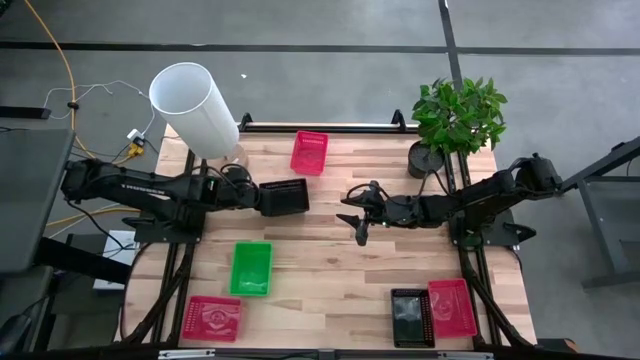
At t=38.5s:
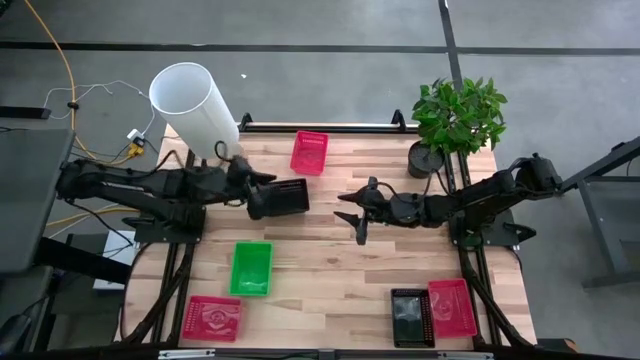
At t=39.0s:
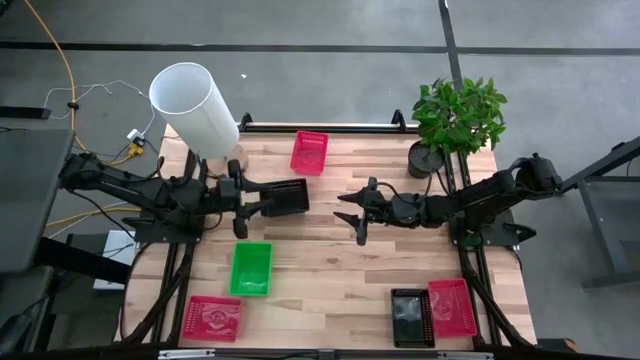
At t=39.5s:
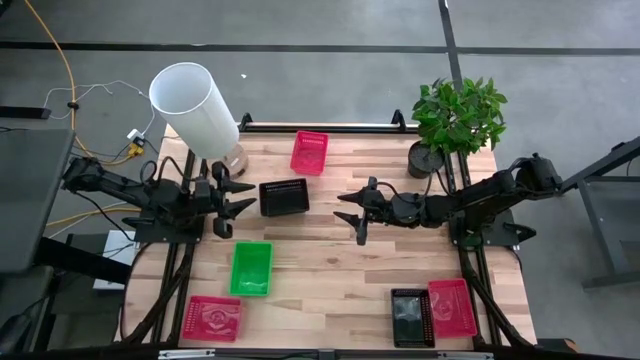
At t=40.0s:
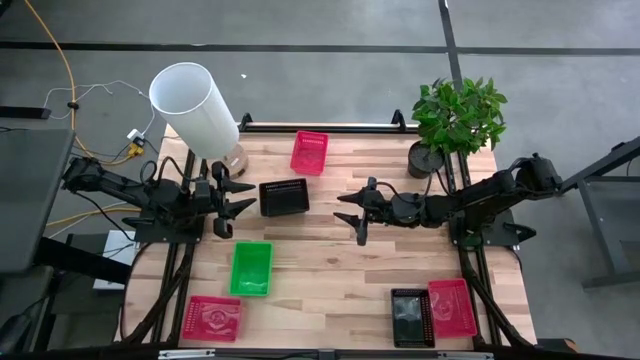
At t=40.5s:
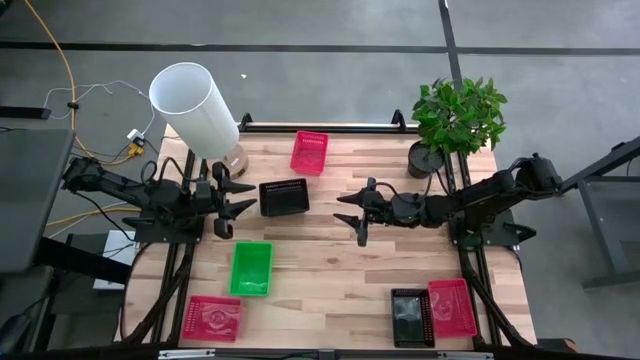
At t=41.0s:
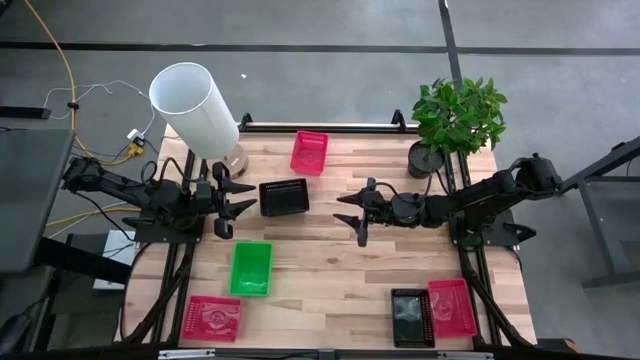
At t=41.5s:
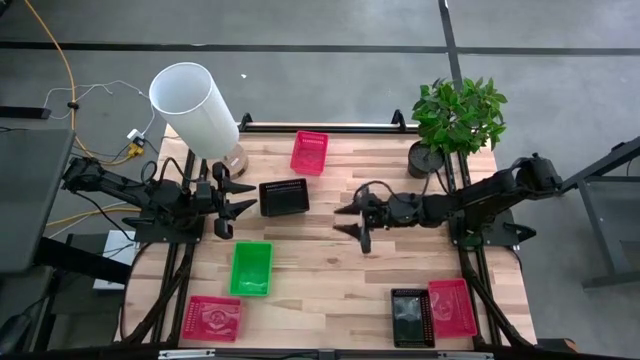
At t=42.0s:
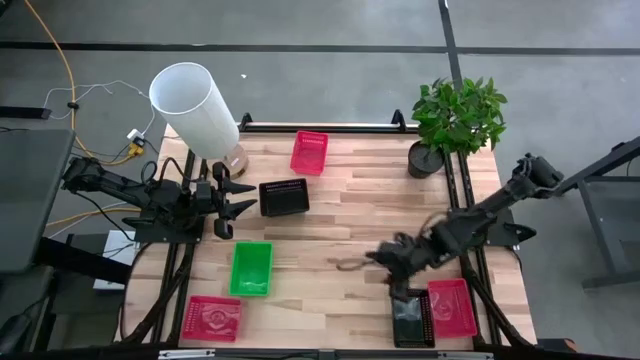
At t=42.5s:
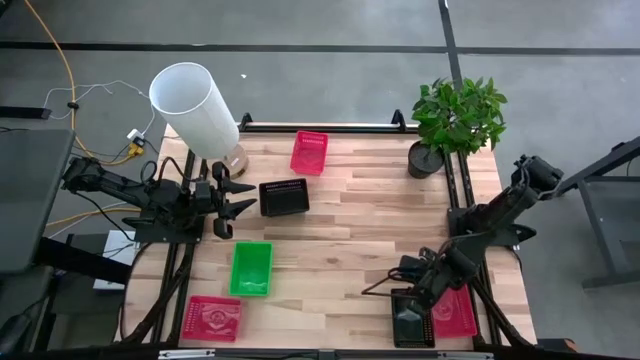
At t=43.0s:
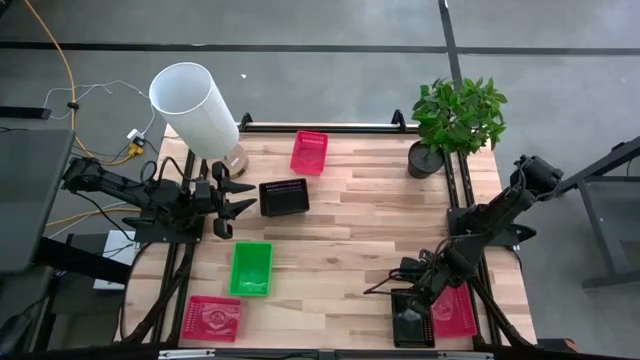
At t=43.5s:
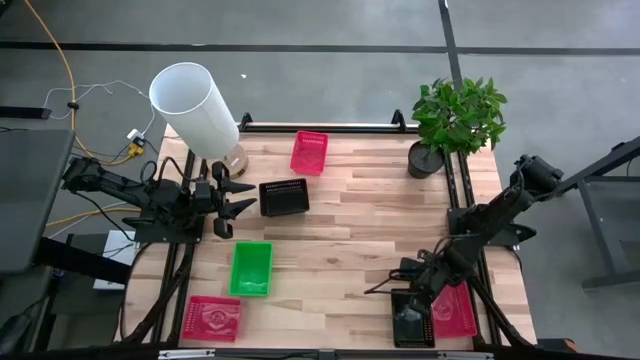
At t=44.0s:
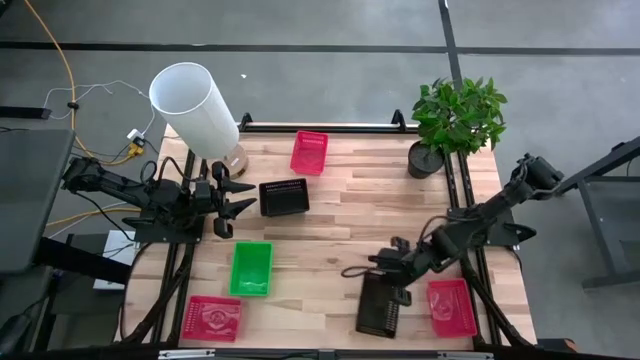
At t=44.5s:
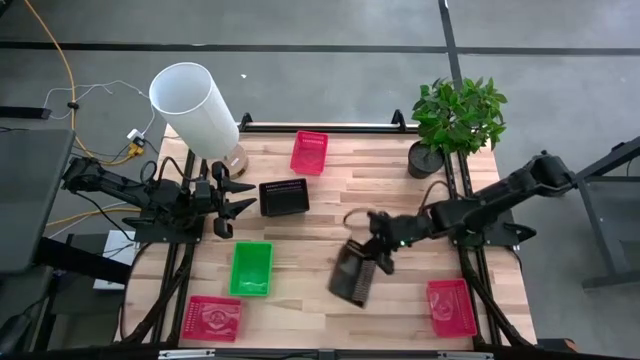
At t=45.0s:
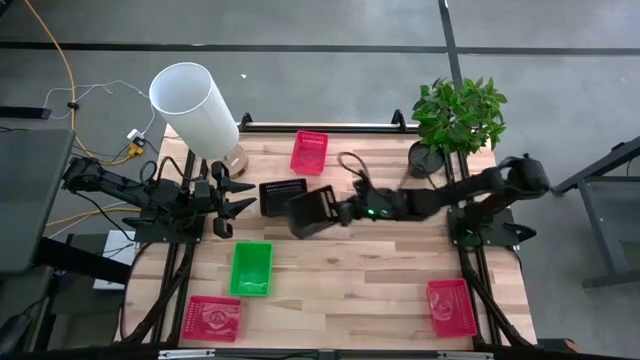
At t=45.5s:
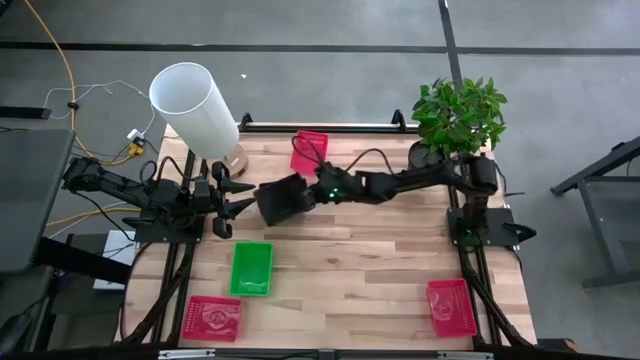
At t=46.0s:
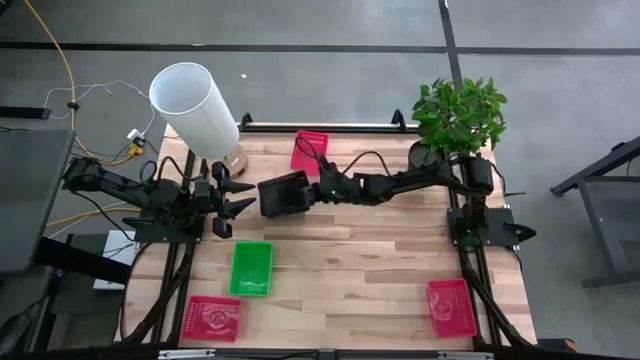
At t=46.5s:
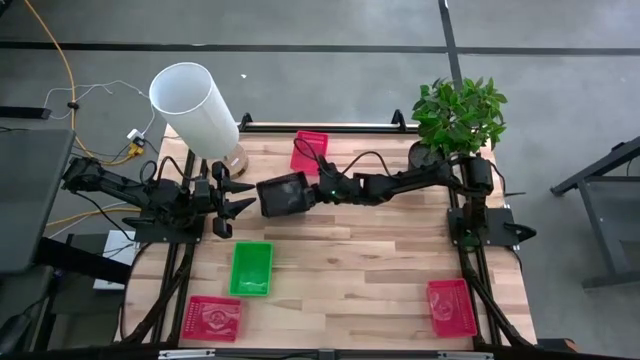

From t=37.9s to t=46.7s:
Stack the bottom black bin on top of the top black bin

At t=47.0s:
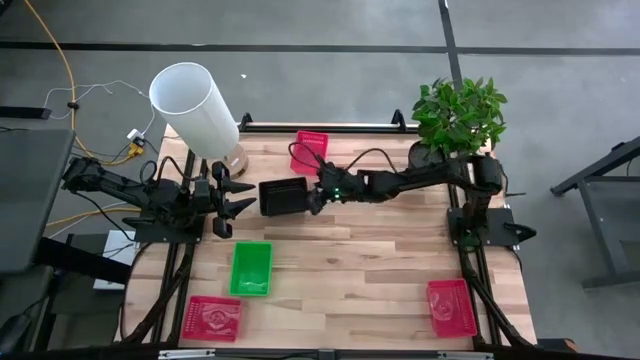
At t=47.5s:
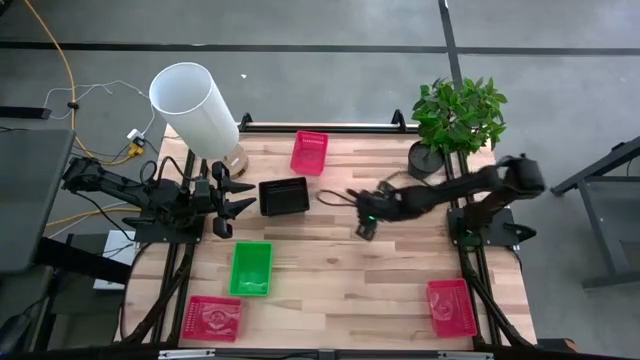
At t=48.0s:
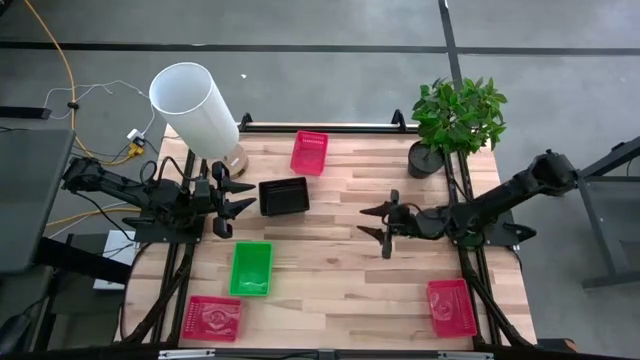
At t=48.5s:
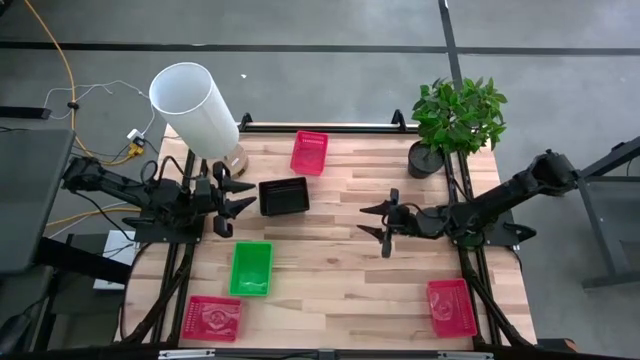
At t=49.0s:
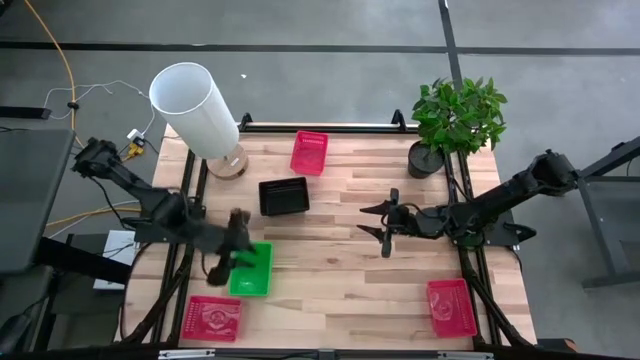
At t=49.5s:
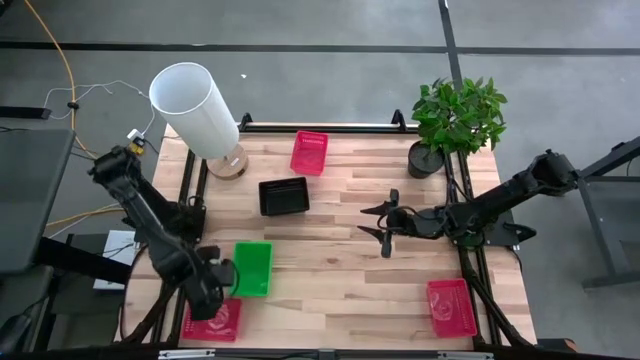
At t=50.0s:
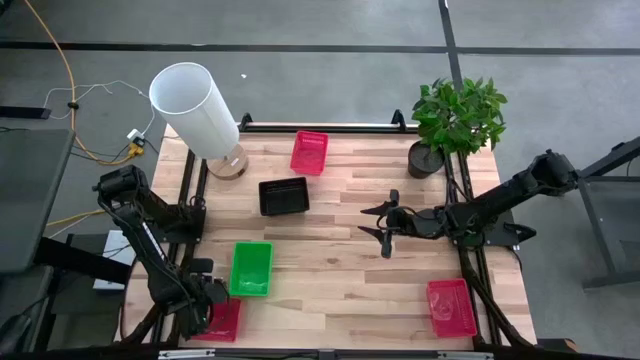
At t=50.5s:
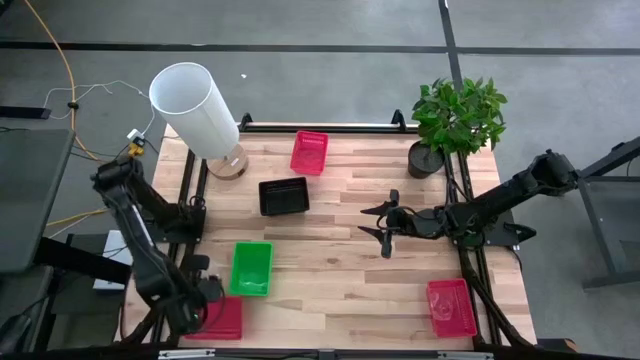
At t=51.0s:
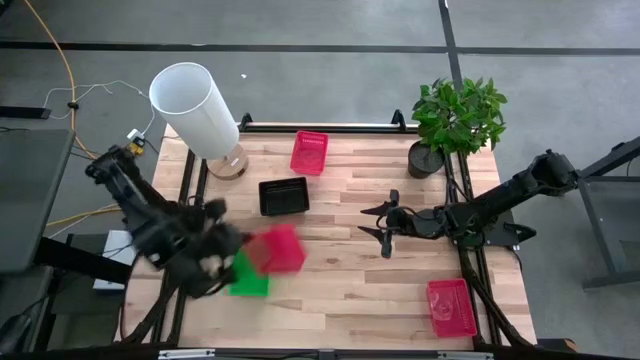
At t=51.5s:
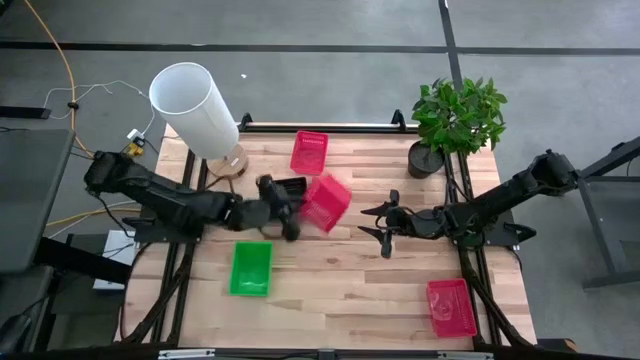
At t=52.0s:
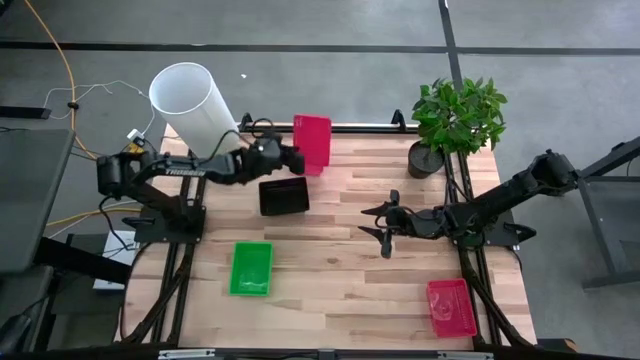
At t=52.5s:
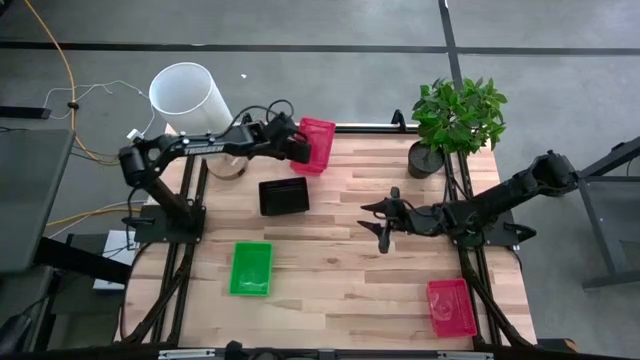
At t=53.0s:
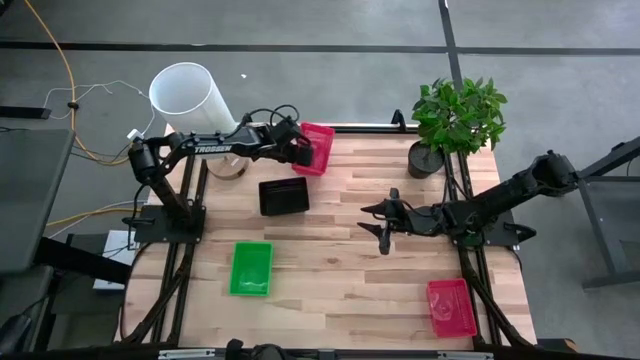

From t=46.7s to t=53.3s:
Stack the bottom left red bin on top of the top red bin

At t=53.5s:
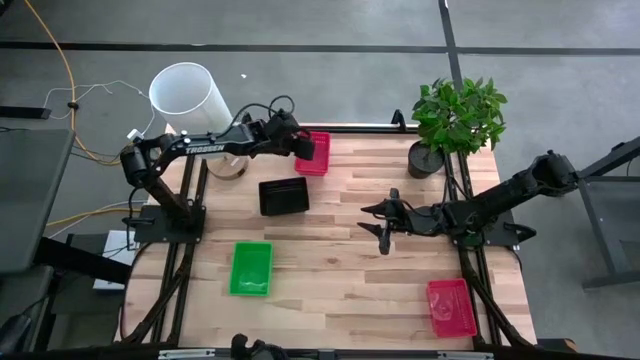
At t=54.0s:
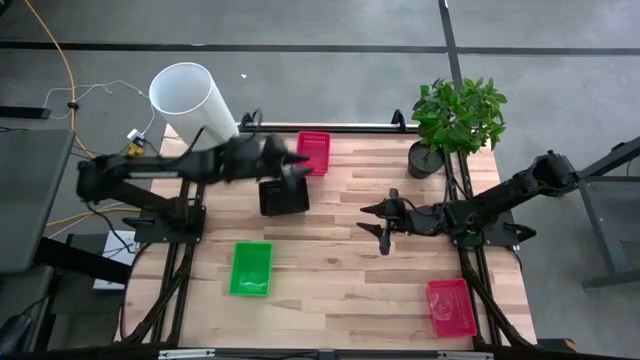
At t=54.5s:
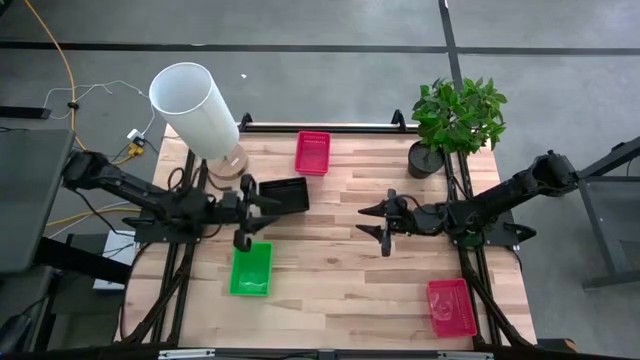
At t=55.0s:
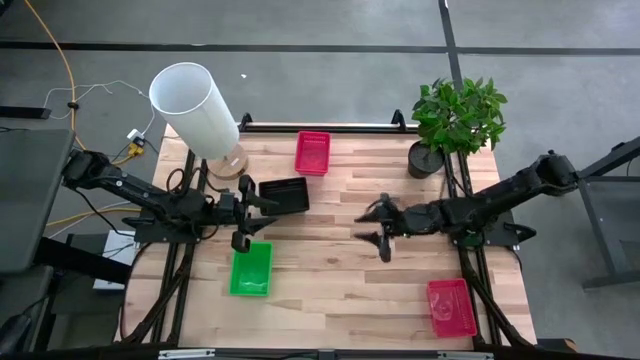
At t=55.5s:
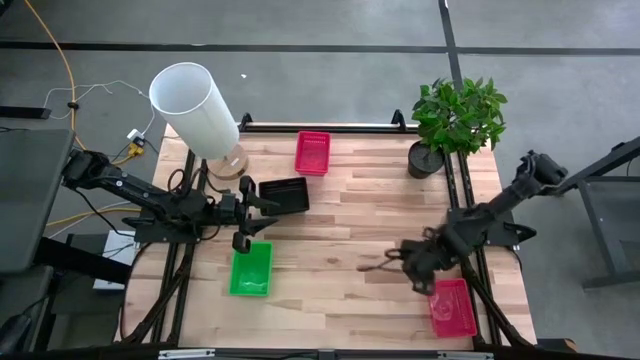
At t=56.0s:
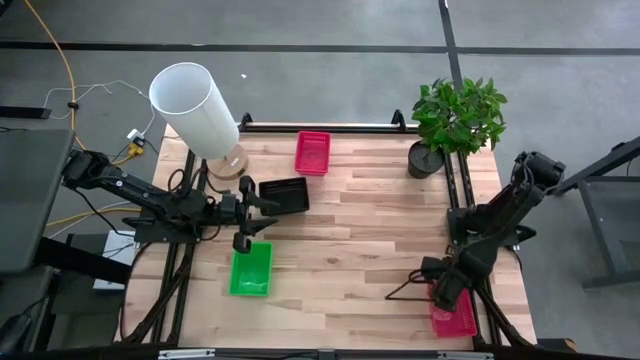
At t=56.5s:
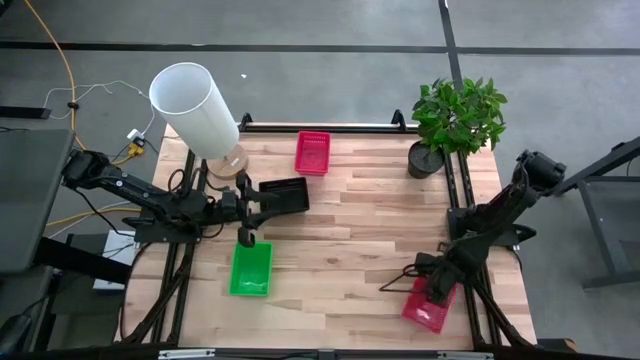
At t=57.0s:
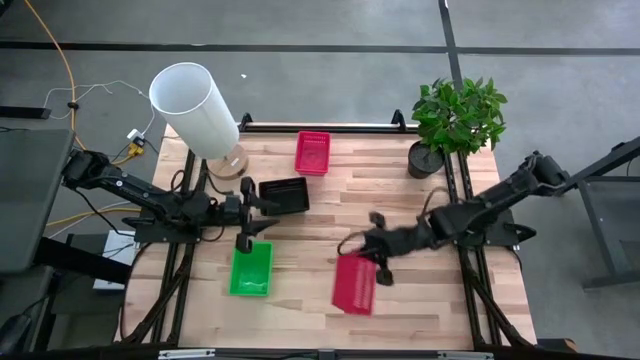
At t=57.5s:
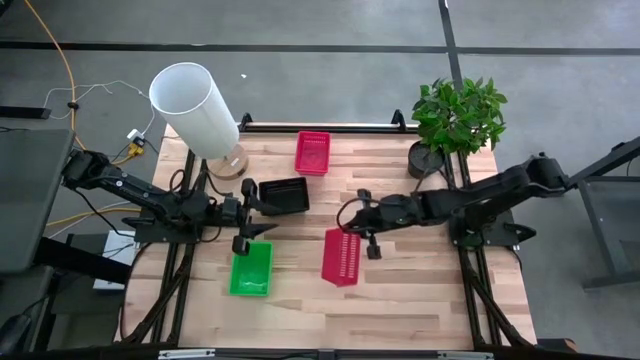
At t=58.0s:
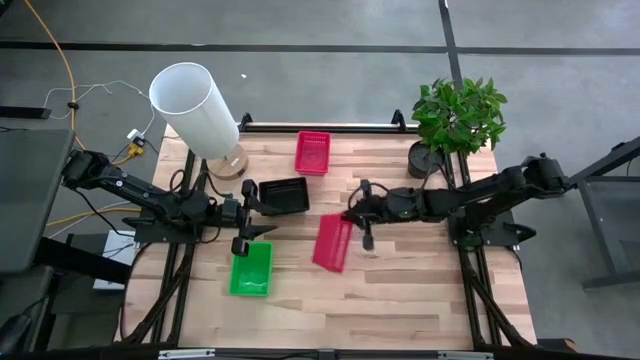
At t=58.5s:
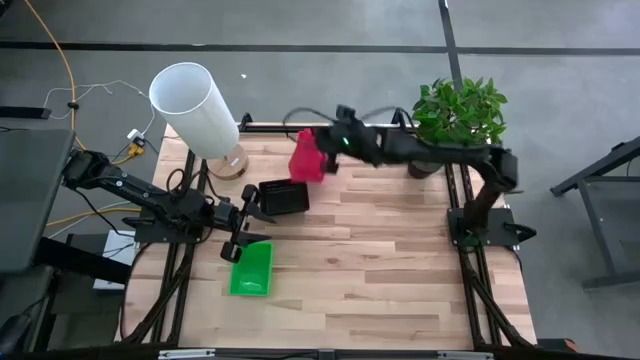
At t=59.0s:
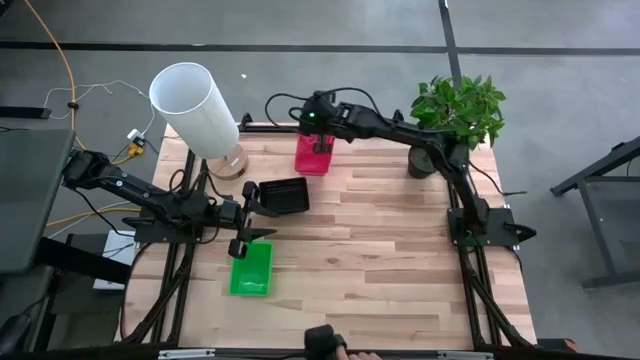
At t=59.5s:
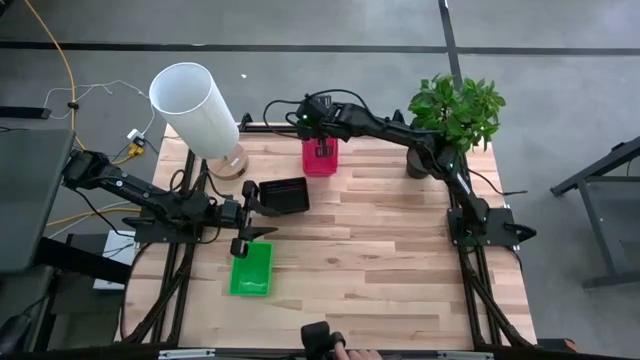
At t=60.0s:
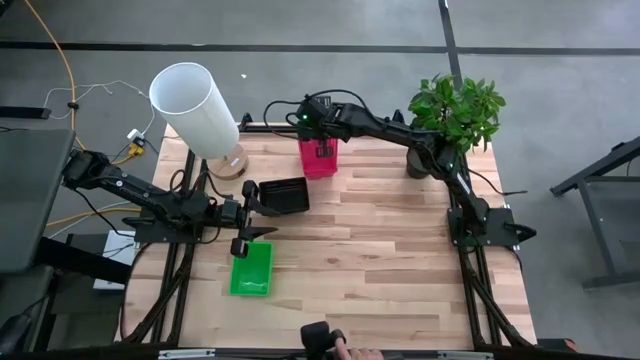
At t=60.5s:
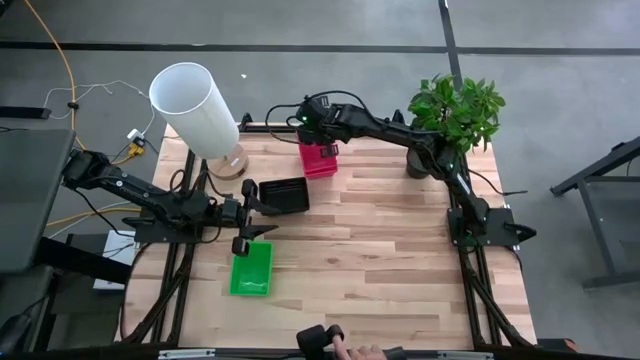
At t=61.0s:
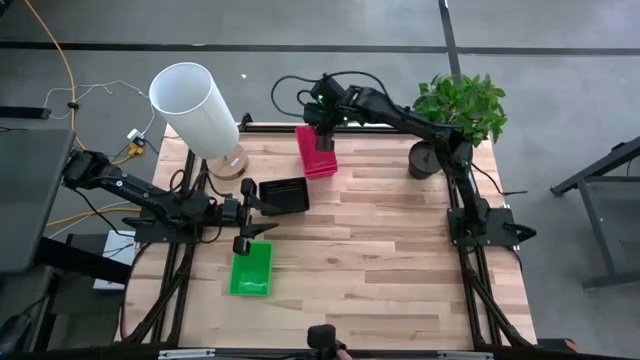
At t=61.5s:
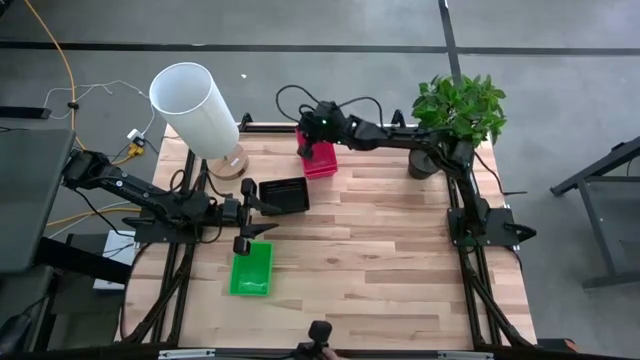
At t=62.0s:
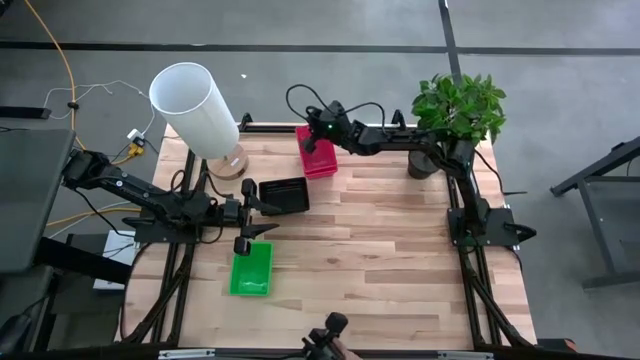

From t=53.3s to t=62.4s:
Stack the bottom red bin on top of the top red bin
